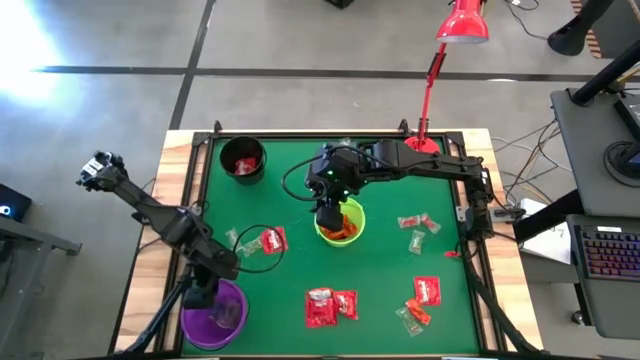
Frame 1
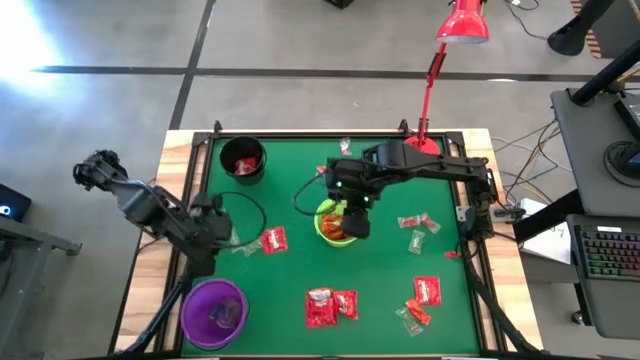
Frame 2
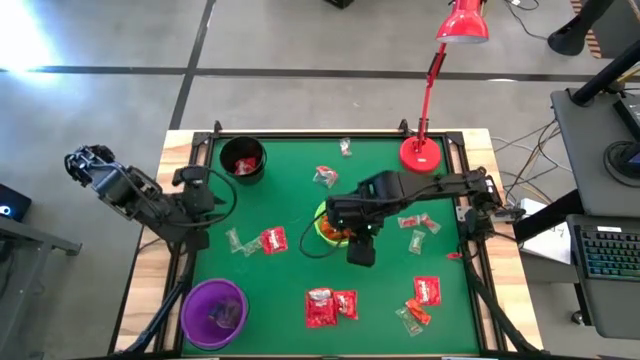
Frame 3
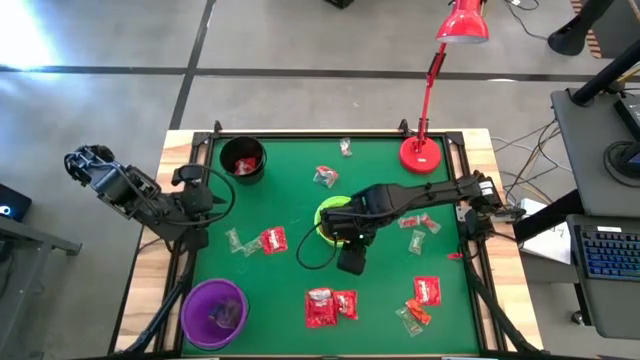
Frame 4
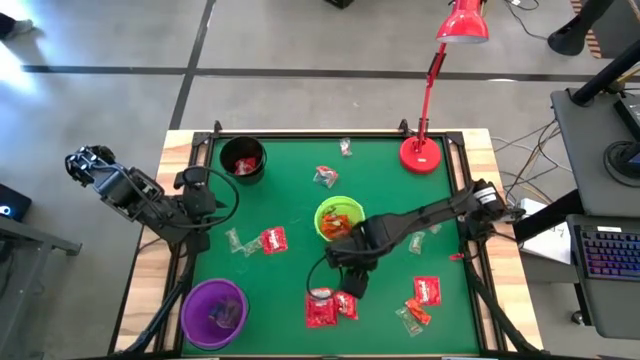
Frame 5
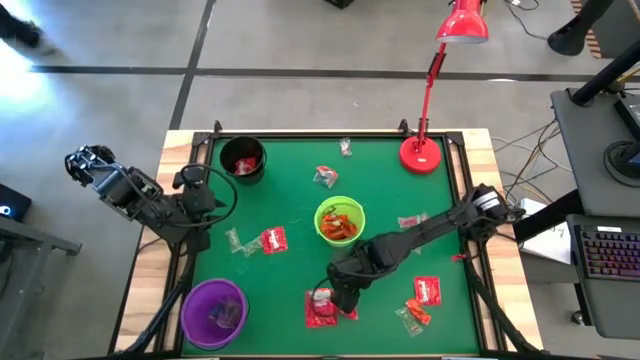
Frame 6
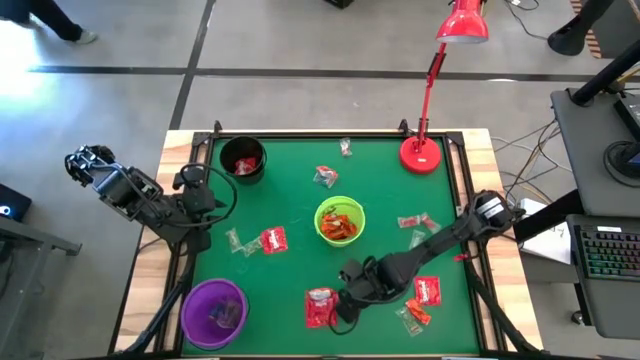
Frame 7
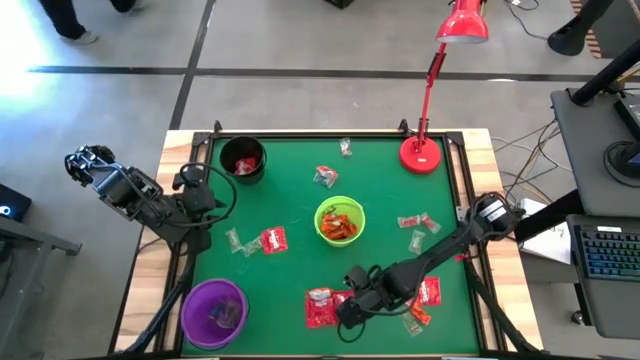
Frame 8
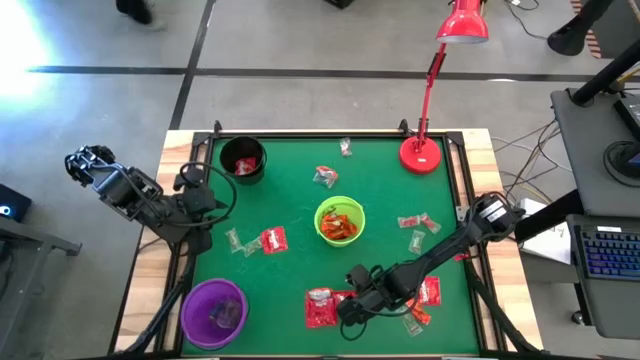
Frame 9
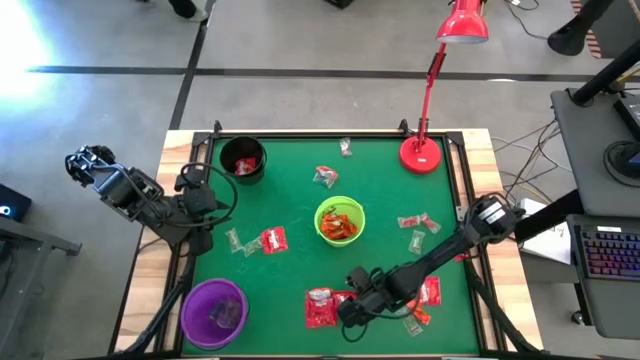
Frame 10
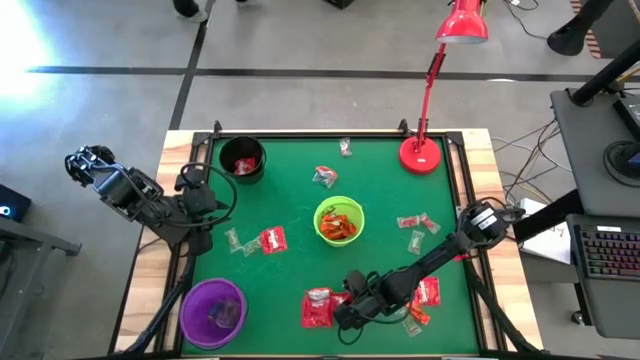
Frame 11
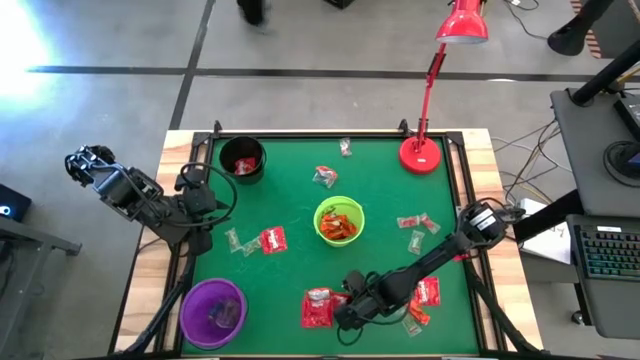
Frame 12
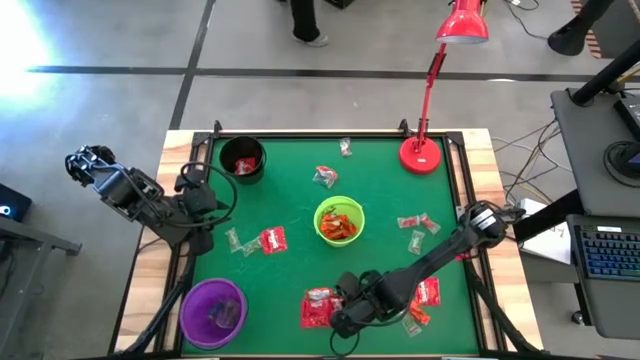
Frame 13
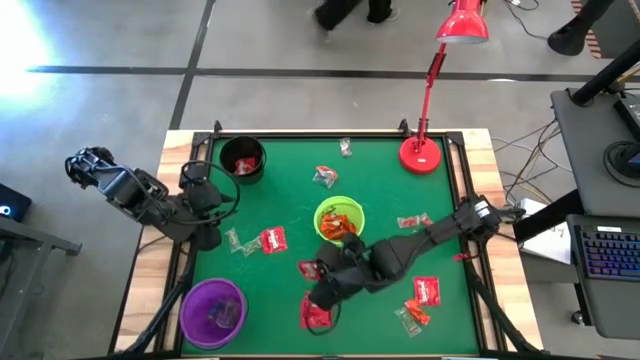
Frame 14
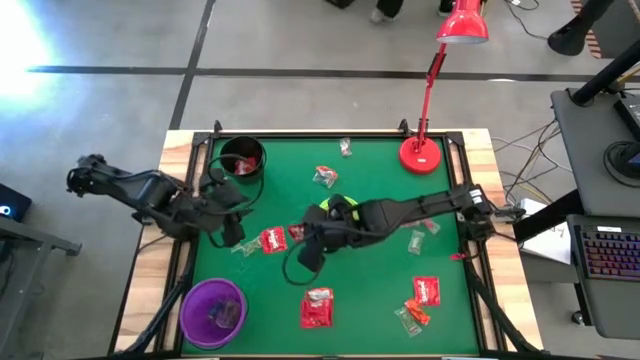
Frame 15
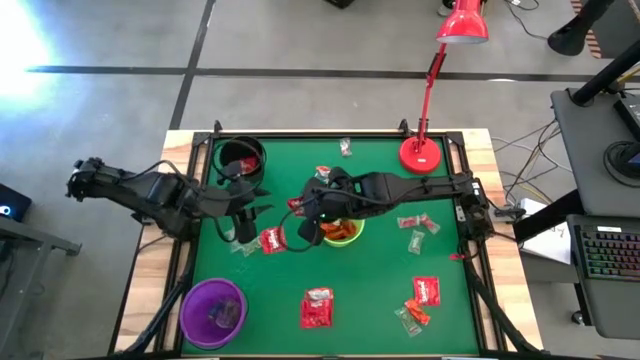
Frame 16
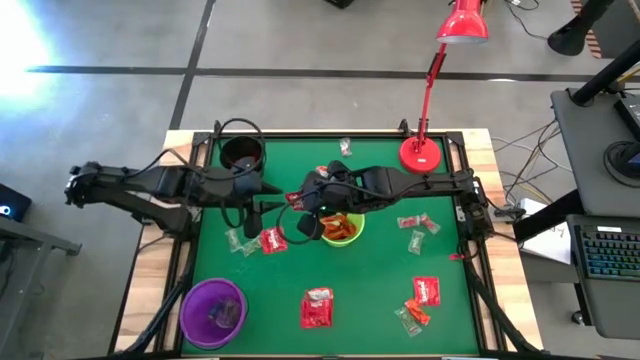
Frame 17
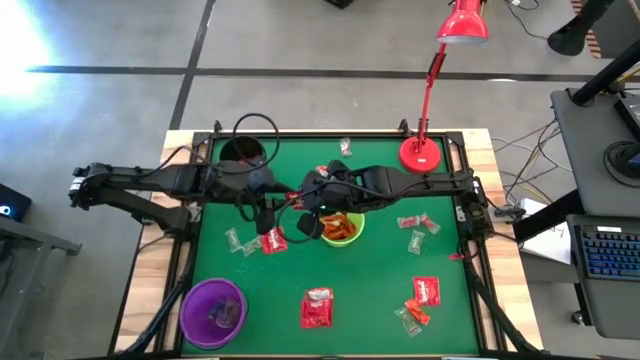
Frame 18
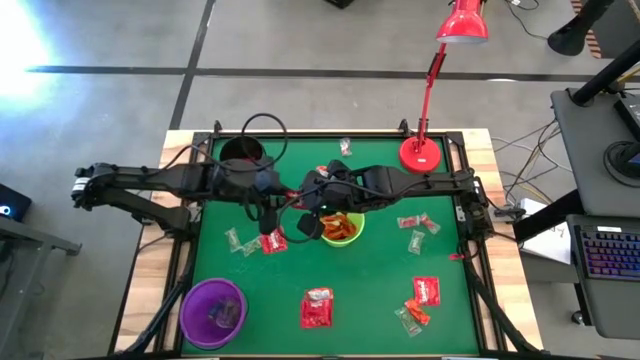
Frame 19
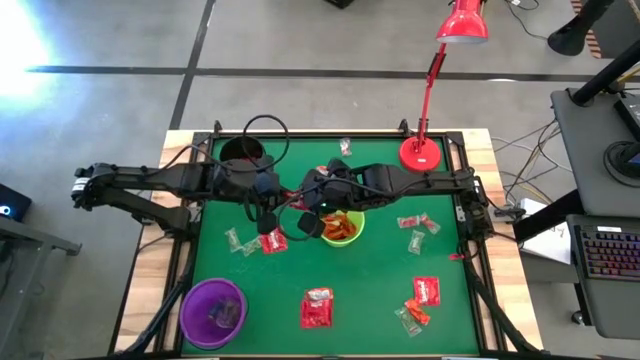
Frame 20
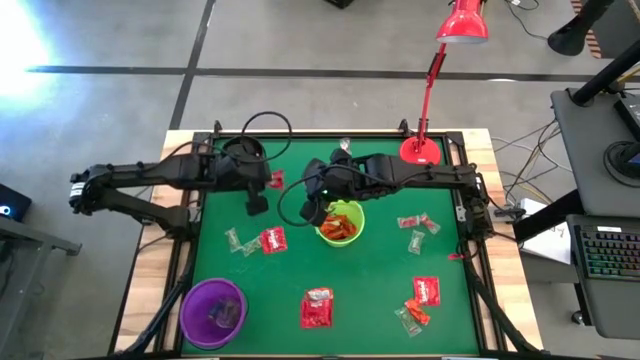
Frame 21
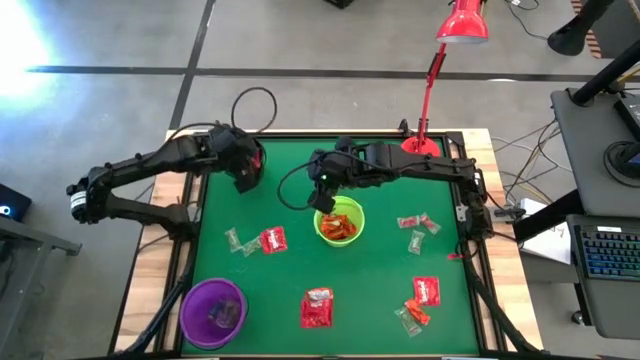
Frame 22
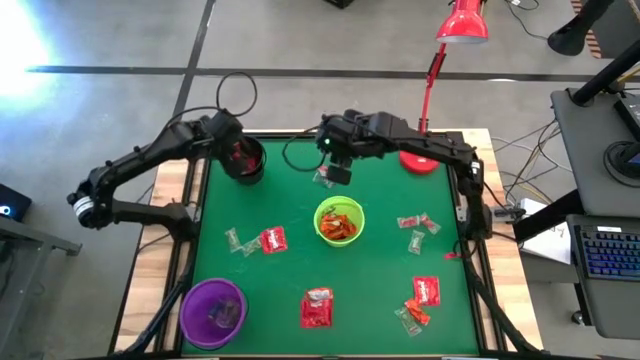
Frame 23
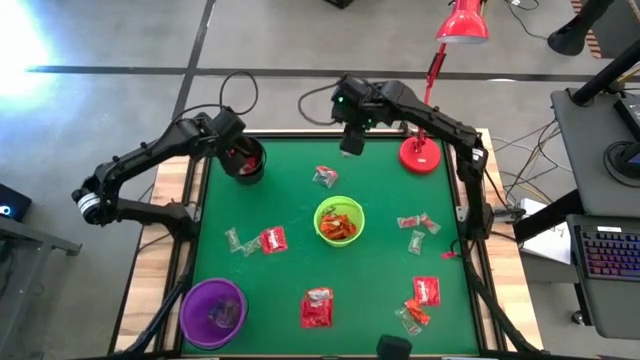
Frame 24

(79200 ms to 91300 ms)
Task: Sort candy
Put the red candy into the black bucket

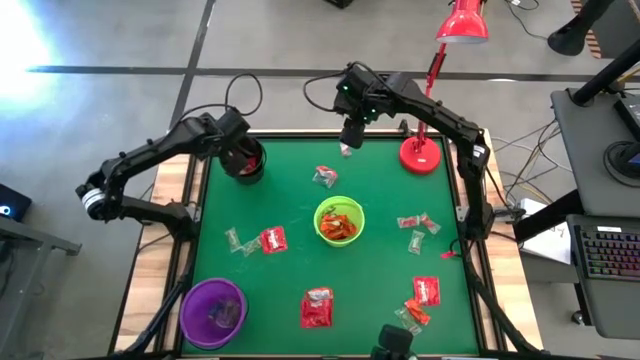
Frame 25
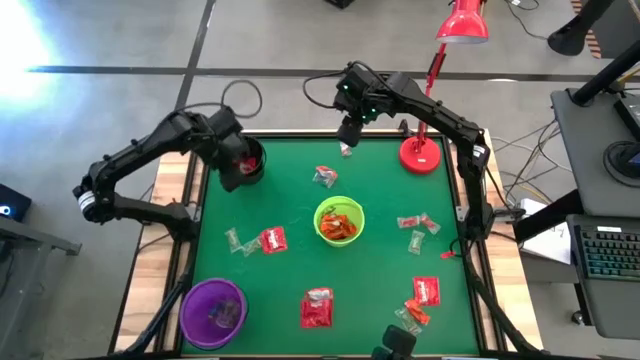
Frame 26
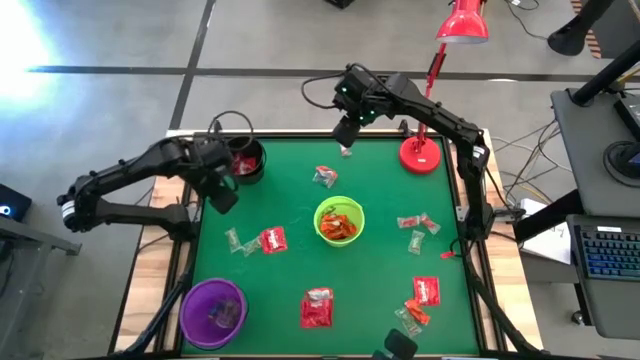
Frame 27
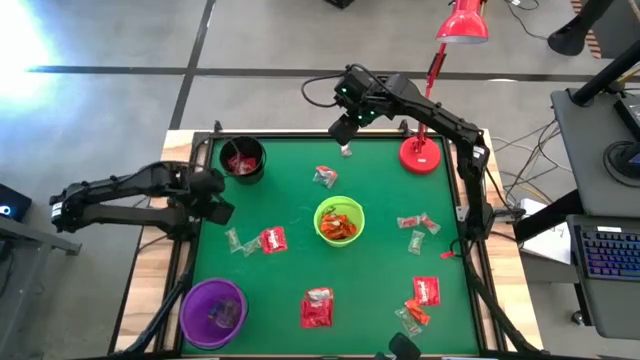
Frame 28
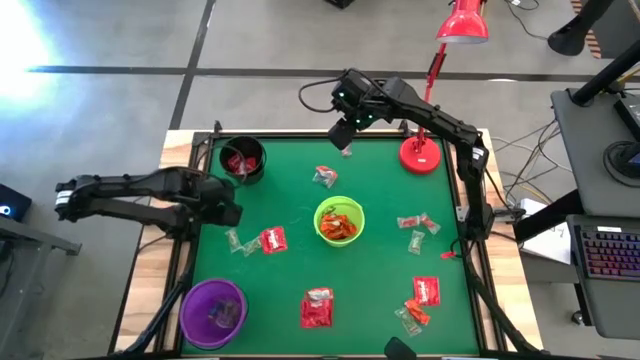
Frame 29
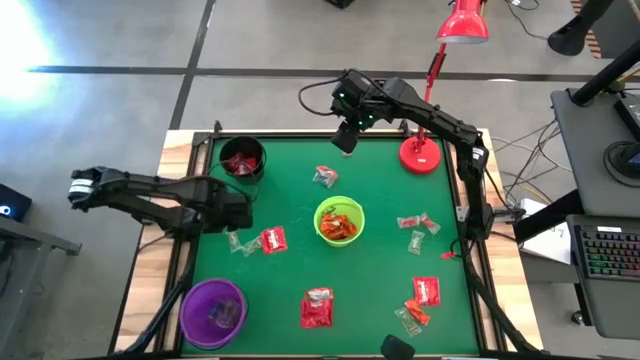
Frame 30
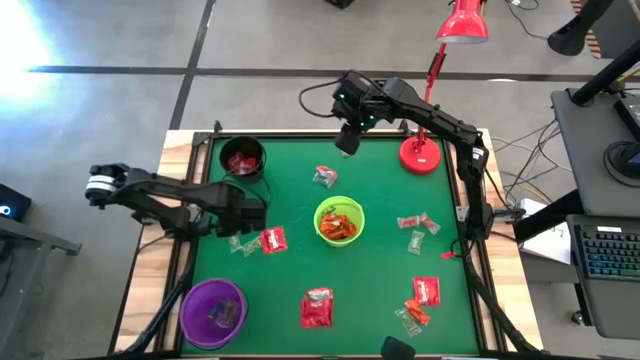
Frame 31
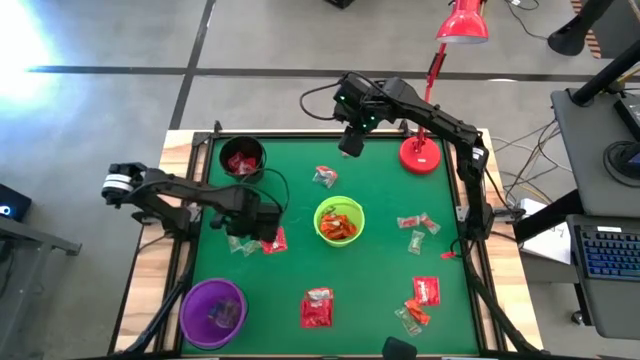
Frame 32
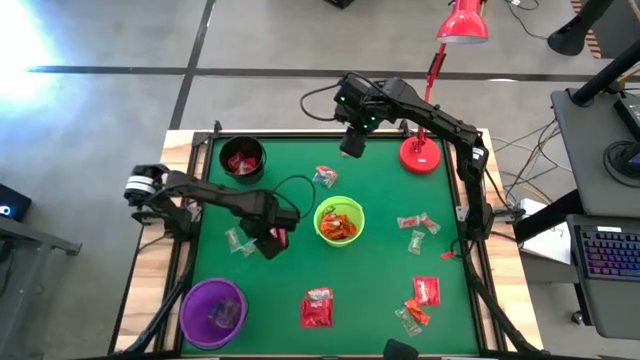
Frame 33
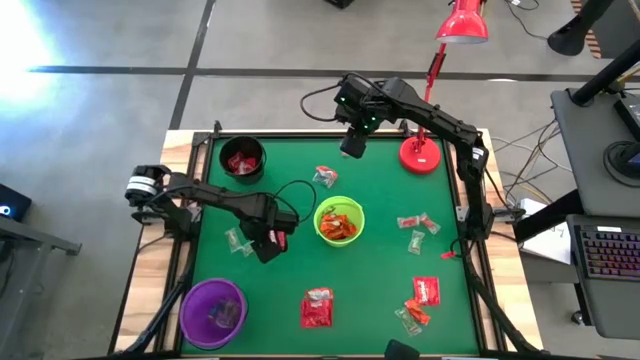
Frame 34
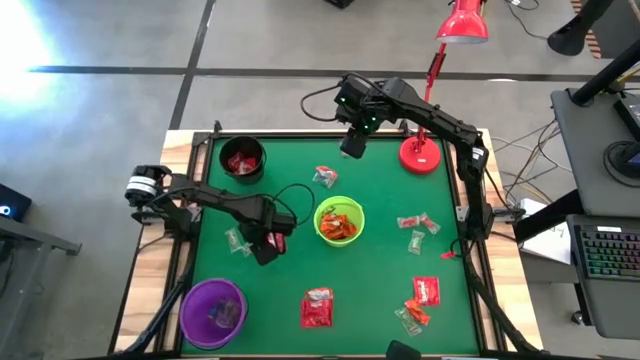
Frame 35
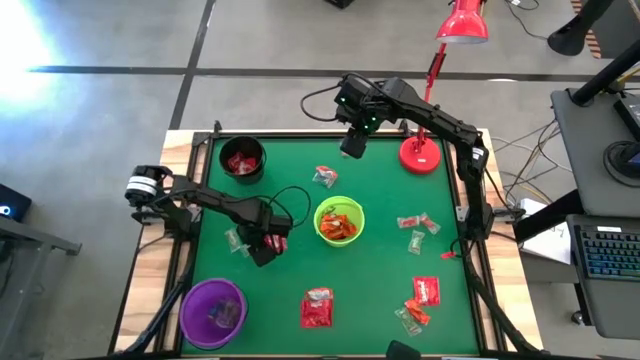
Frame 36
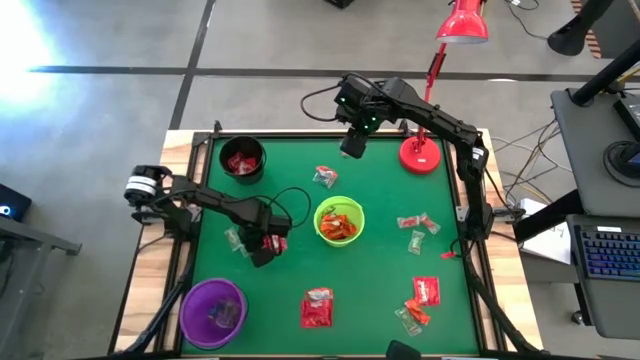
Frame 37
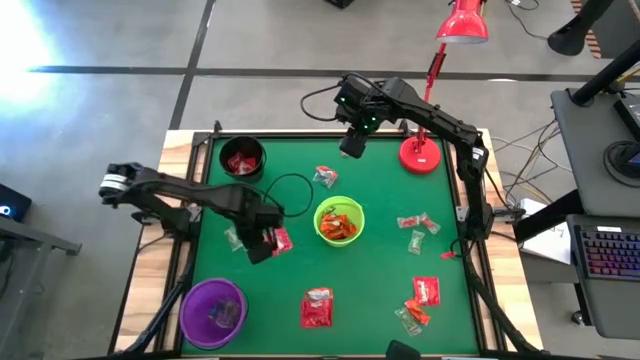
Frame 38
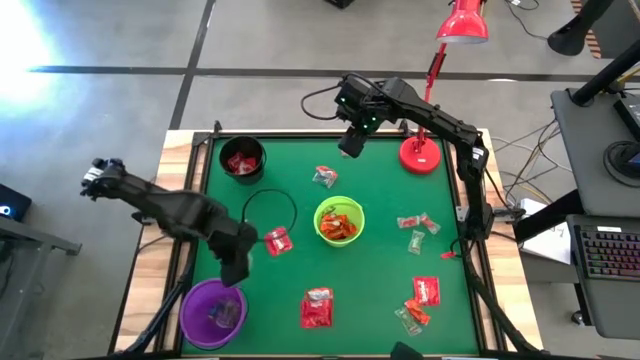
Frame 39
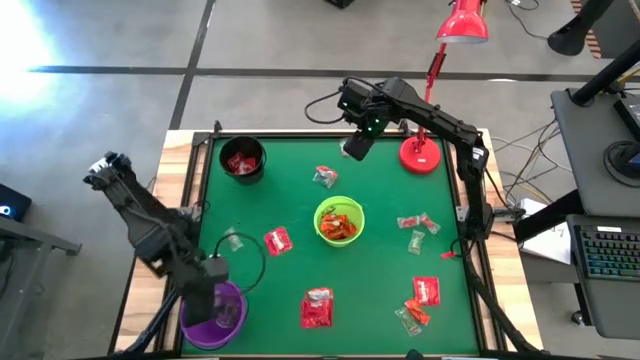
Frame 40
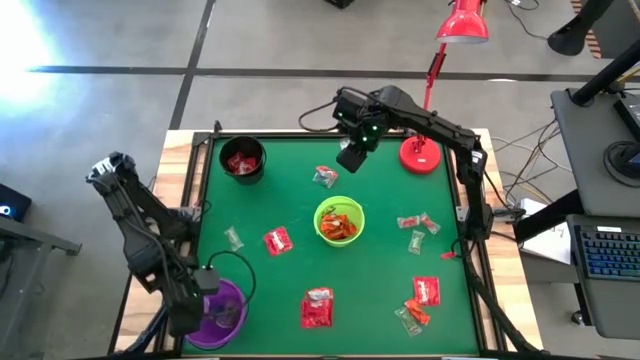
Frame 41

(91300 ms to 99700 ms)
Put the green gummy into the purple bucket
